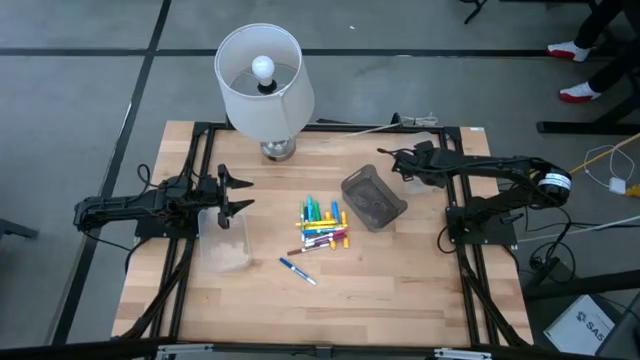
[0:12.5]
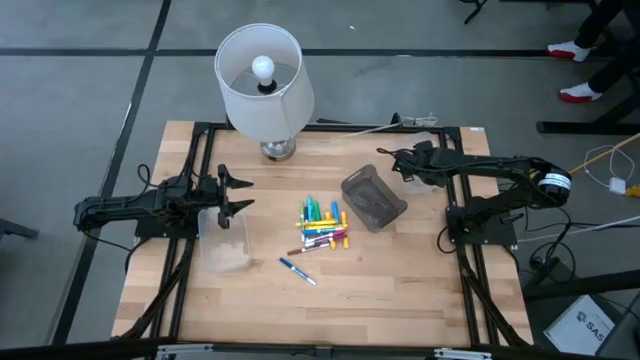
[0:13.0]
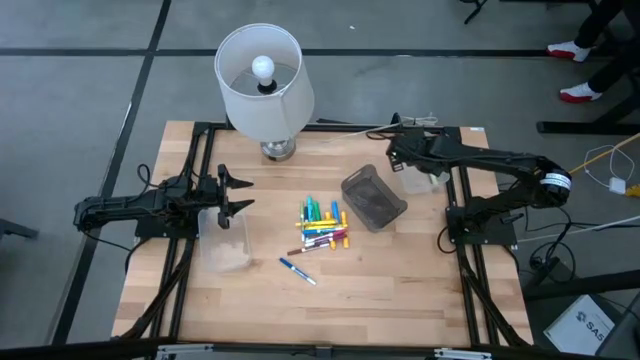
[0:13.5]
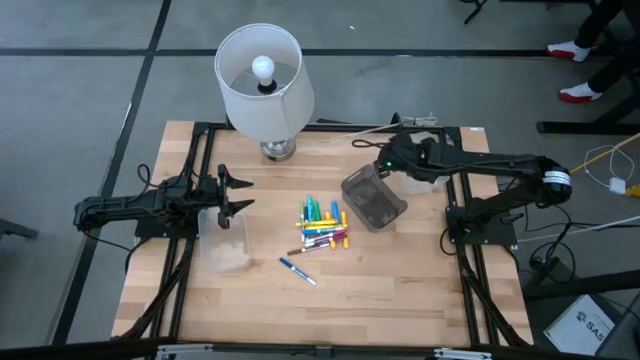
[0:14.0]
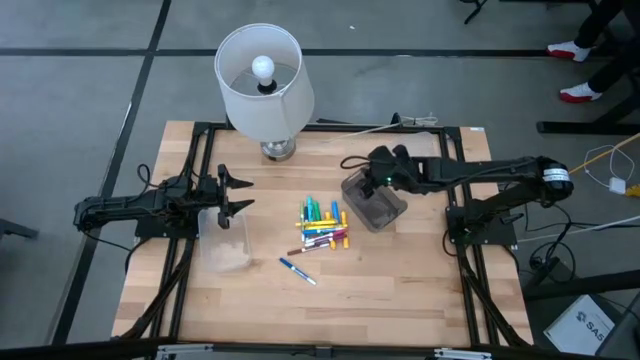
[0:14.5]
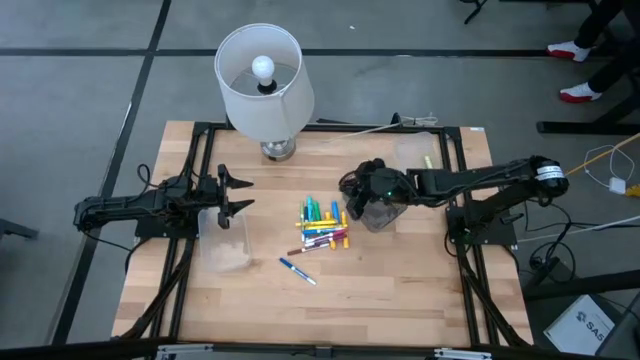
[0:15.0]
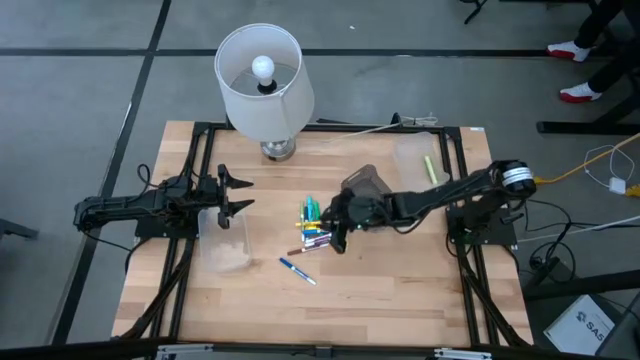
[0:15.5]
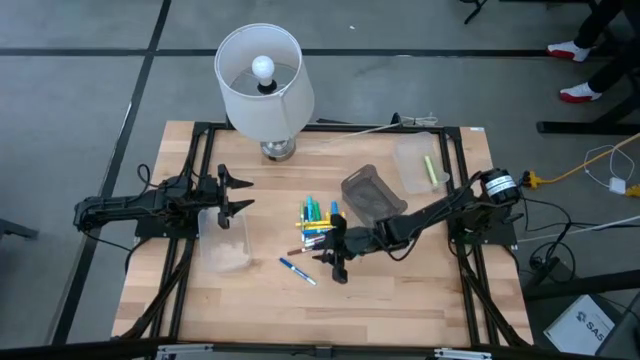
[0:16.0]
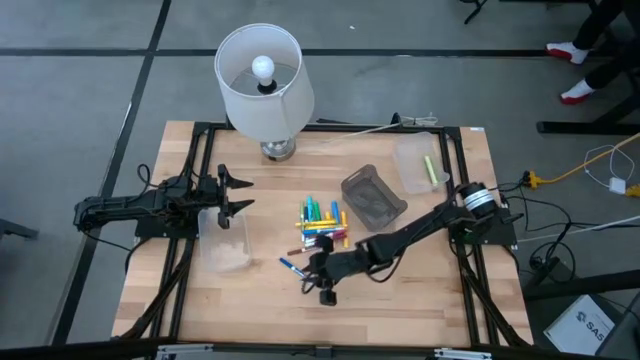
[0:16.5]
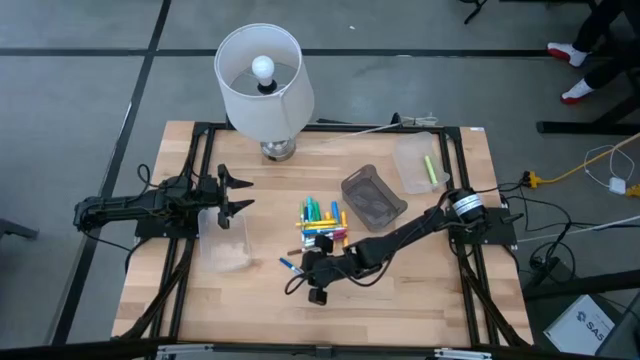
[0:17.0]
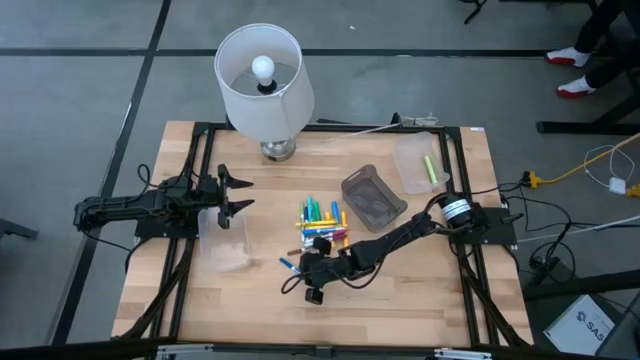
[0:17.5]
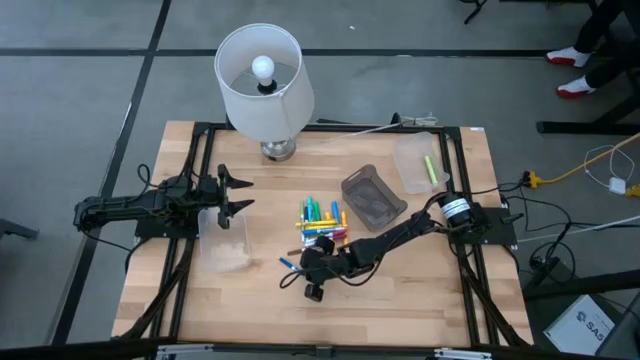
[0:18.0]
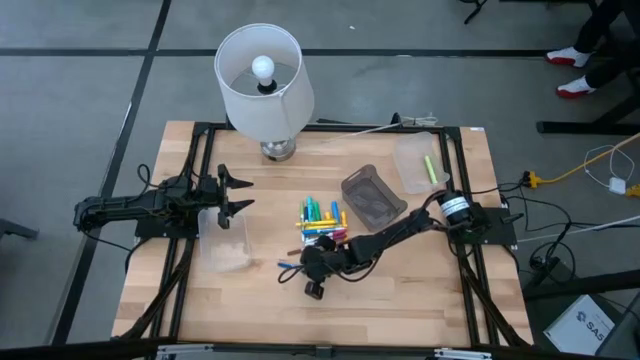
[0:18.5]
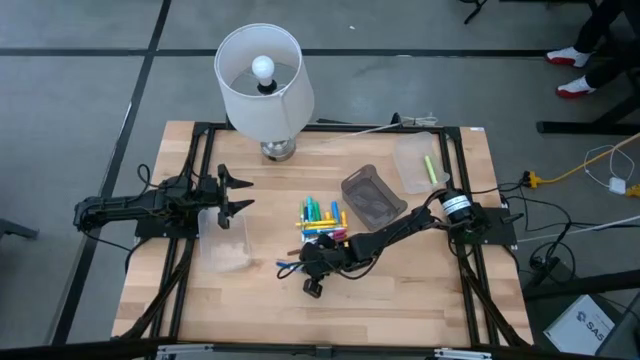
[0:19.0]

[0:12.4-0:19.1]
Task: Pick & Place Markers
Put the blue marker pen into the black bin

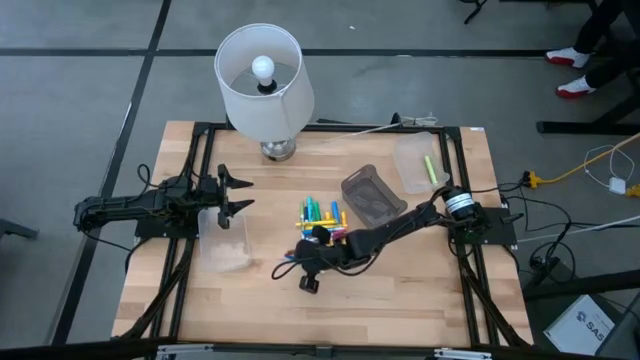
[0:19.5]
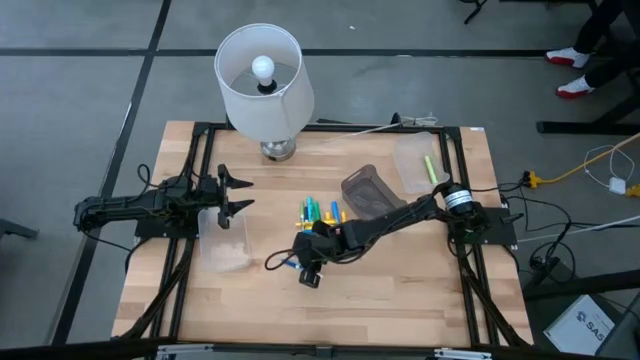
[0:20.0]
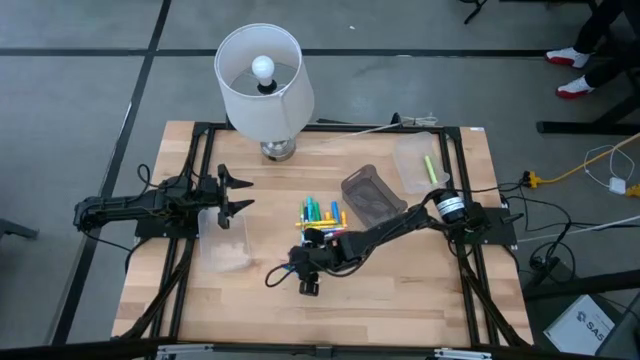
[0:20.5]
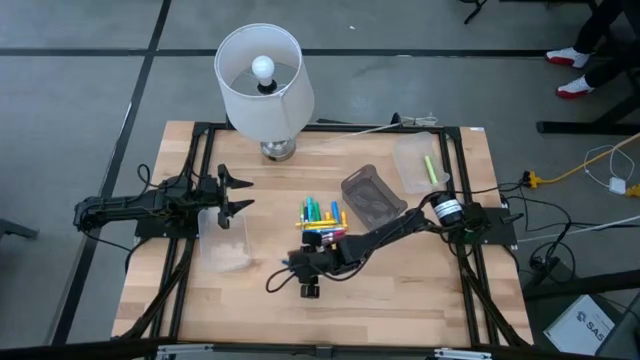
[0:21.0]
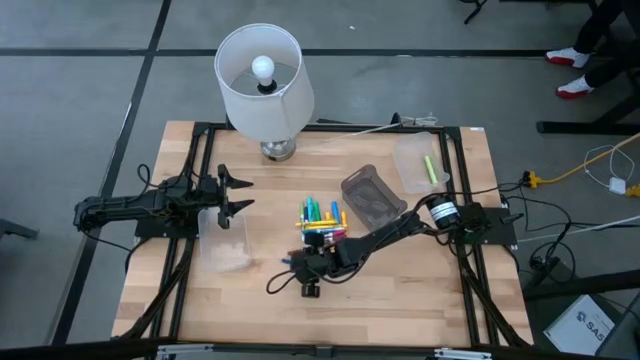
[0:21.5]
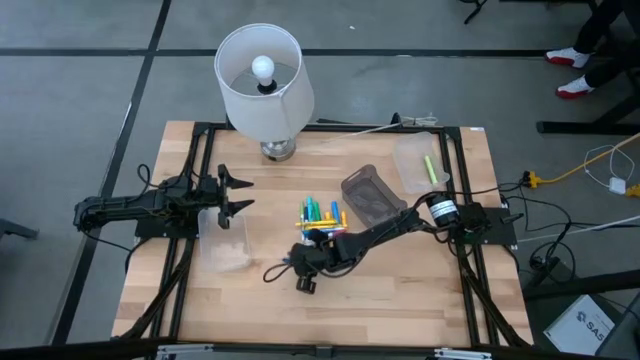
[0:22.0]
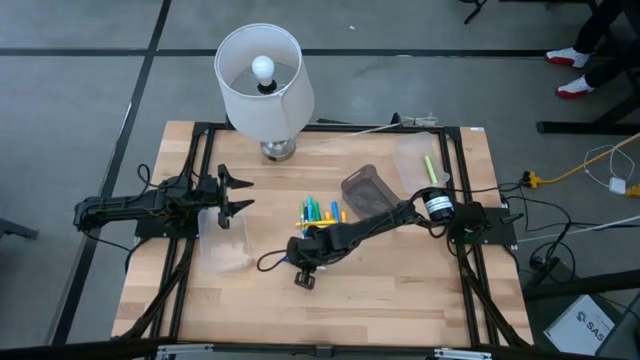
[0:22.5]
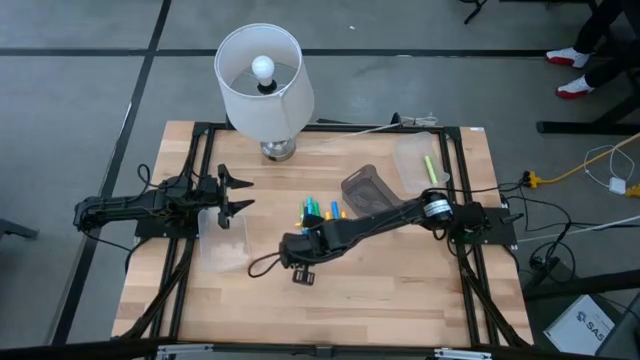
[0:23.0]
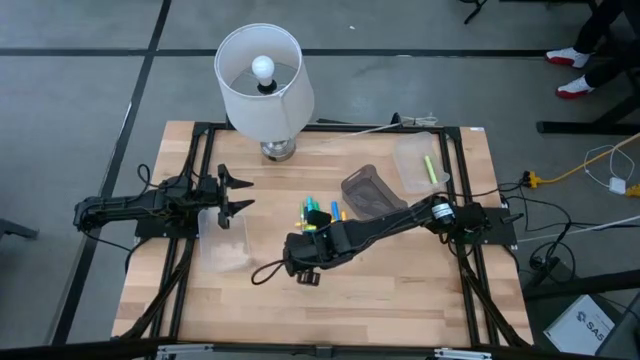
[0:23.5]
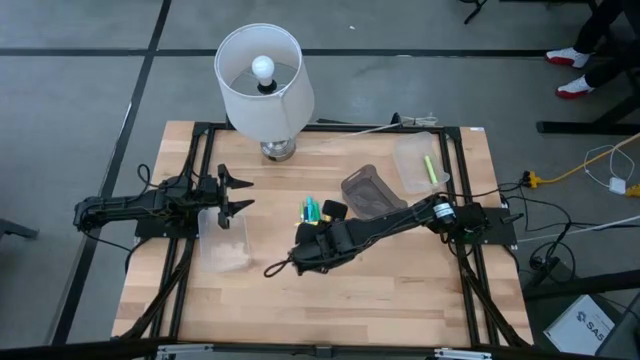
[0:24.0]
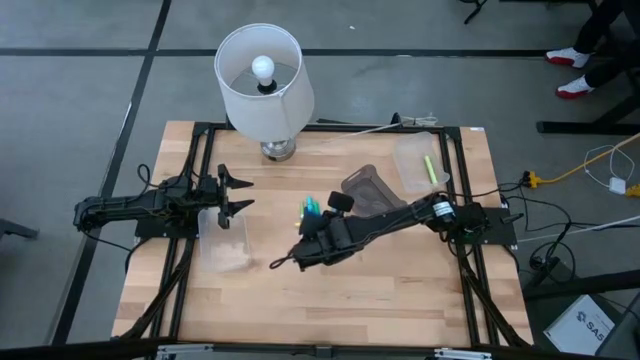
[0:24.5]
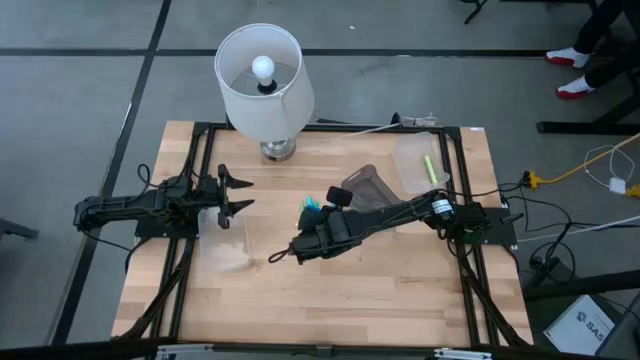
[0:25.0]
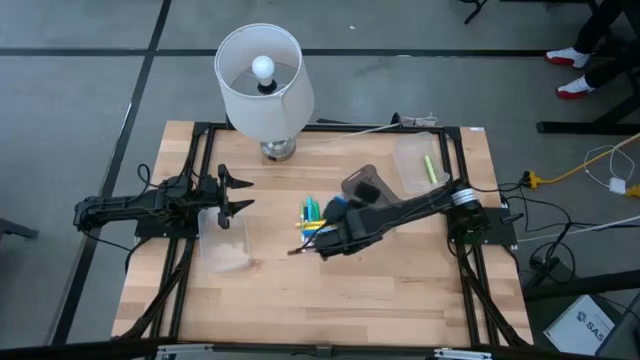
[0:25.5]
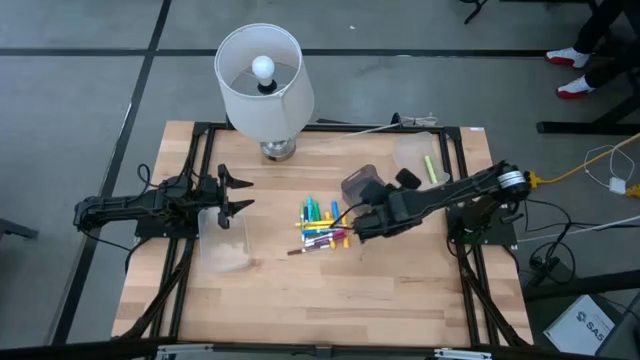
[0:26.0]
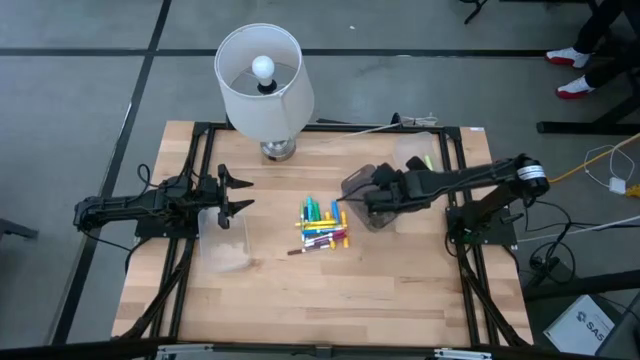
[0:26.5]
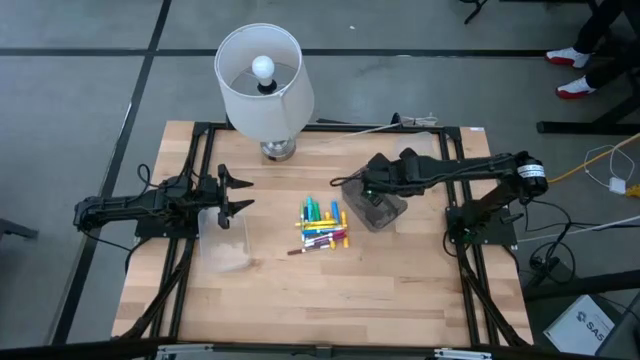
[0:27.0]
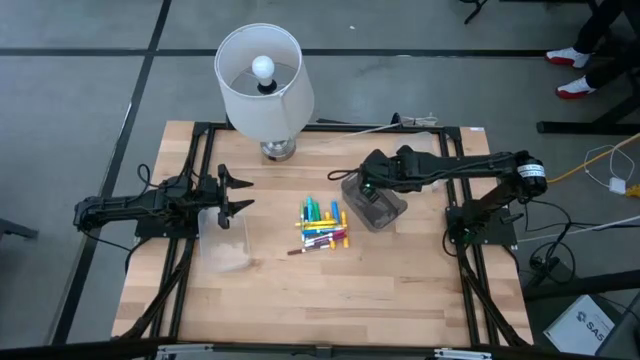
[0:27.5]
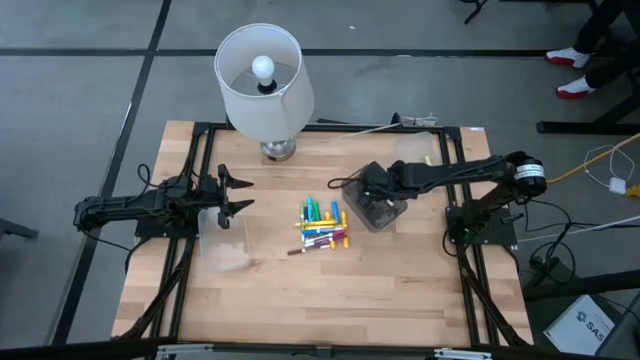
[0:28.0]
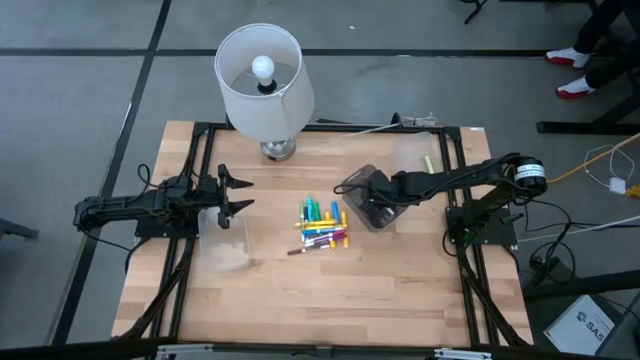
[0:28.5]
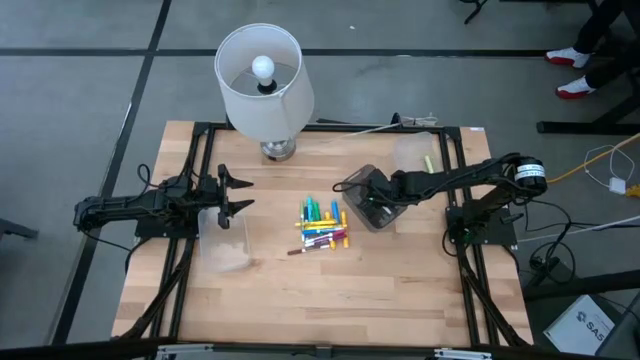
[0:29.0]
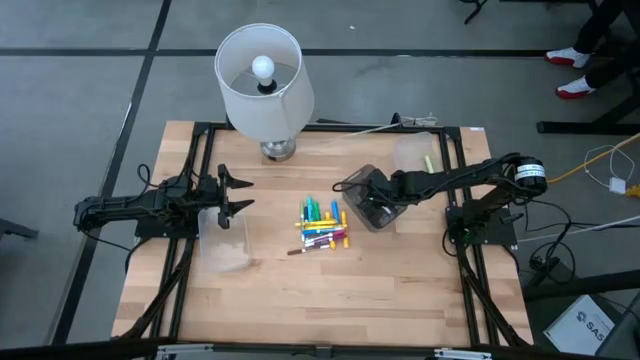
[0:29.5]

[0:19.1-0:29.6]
Put the blue marker pen into the black bin

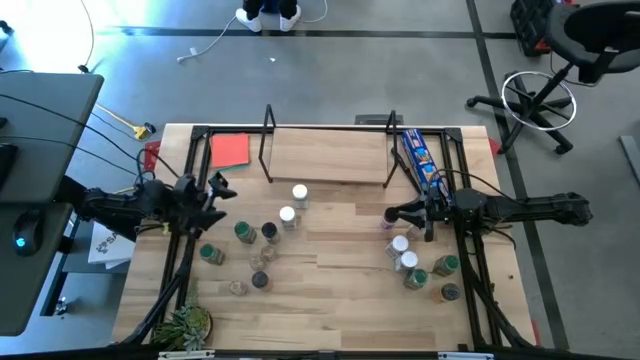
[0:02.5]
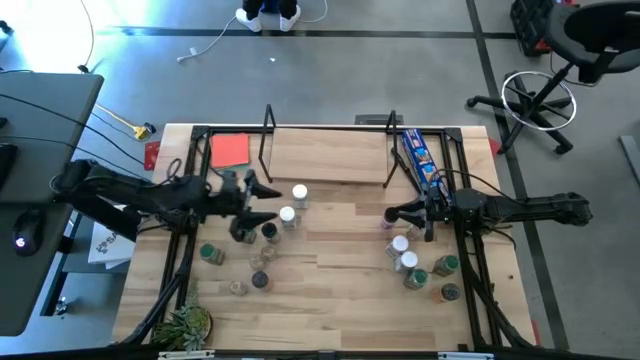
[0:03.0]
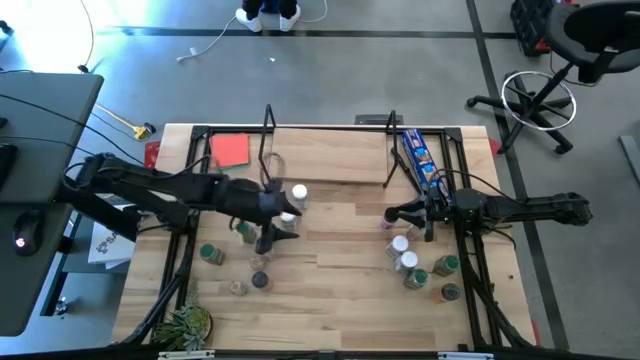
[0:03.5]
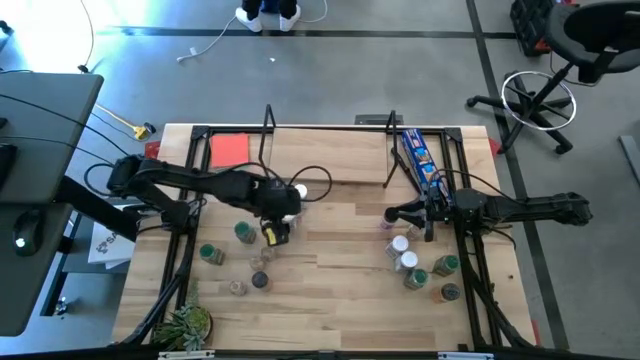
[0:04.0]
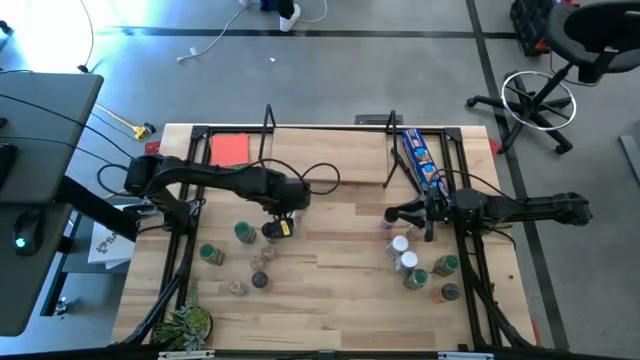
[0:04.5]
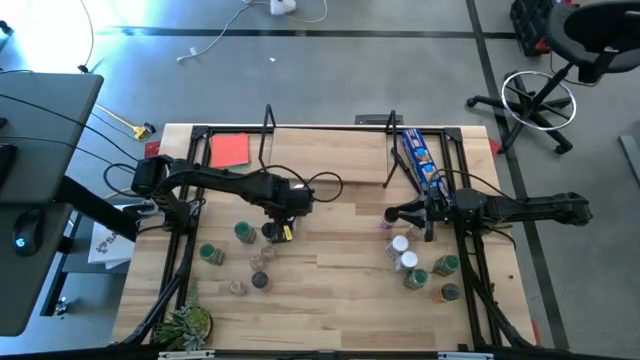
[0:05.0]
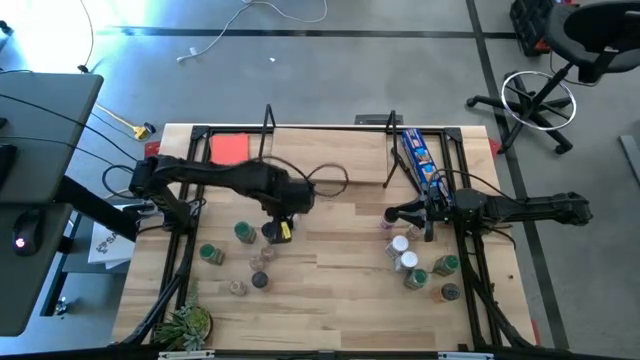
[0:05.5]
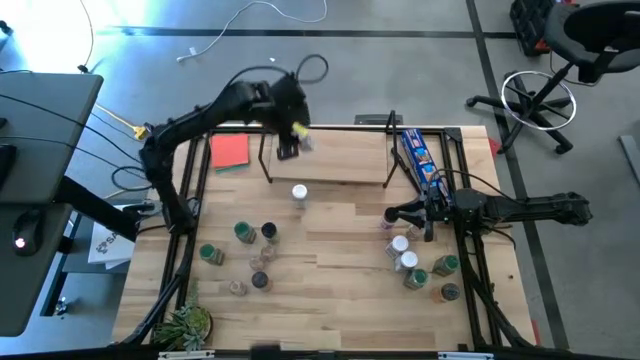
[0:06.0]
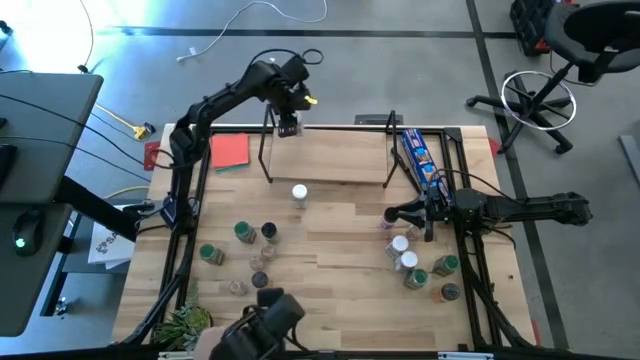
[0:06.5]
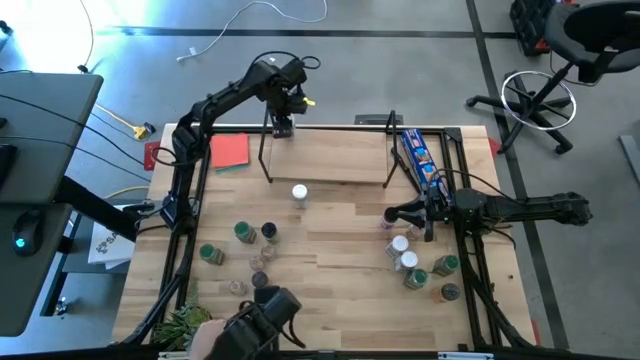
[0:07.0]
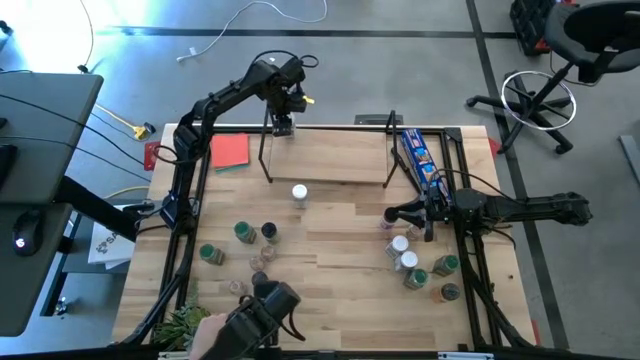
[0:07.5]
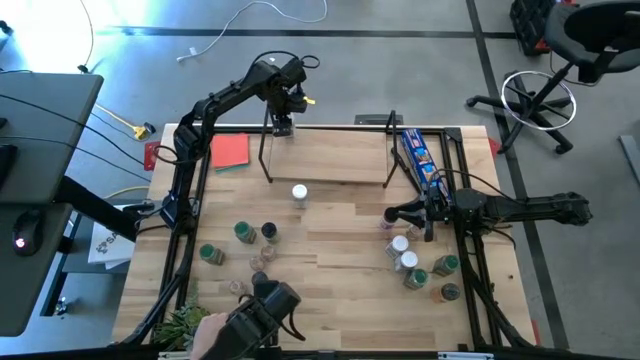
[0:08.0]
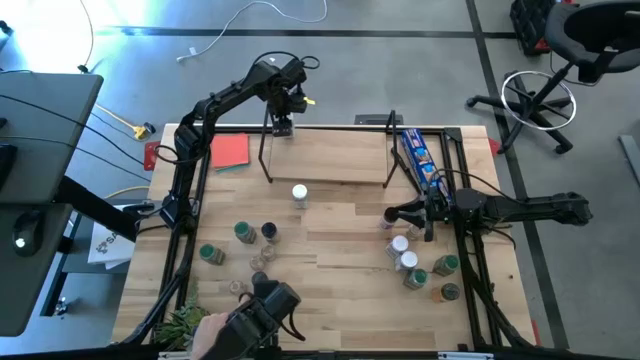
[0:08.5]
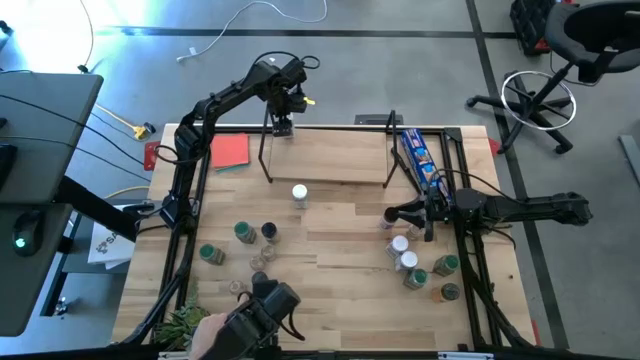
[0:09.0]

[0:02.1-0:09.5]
Task: Shelf spices
Put the white seasoning bottle on the shelf
